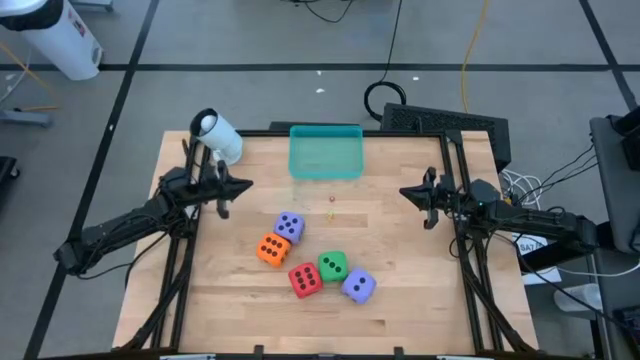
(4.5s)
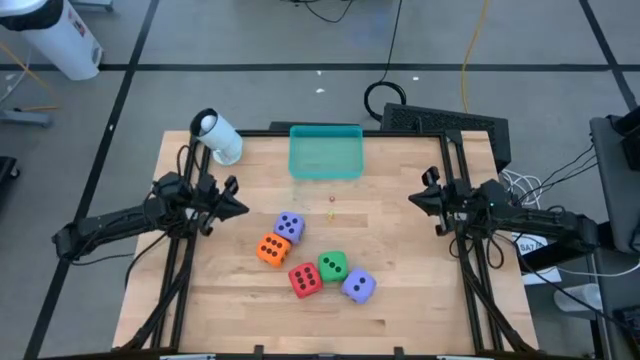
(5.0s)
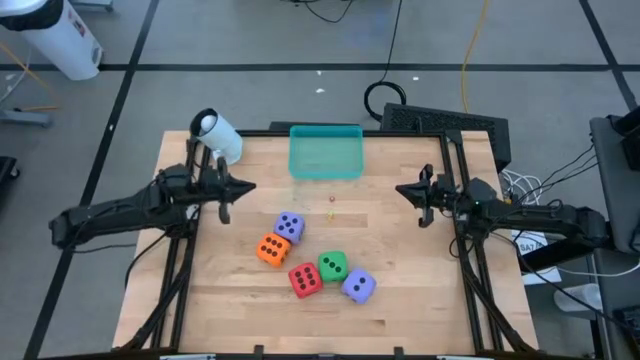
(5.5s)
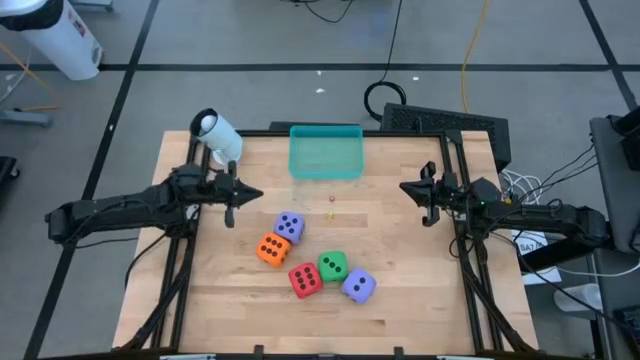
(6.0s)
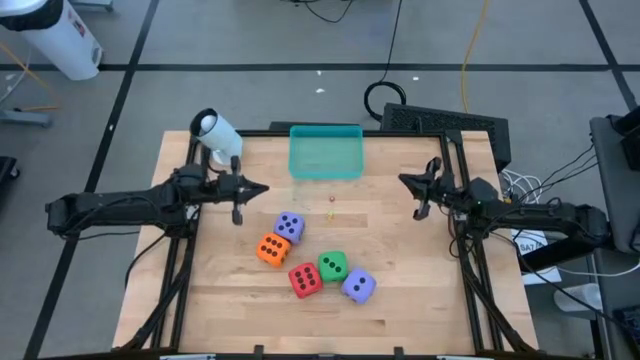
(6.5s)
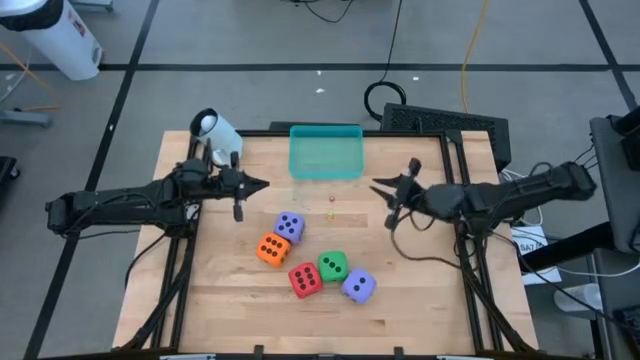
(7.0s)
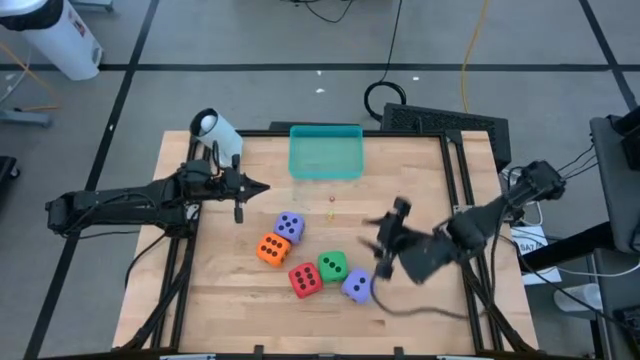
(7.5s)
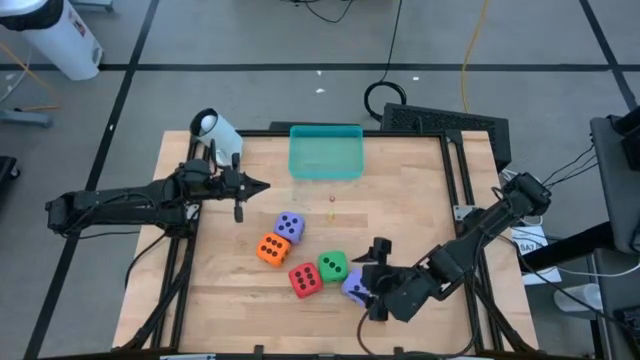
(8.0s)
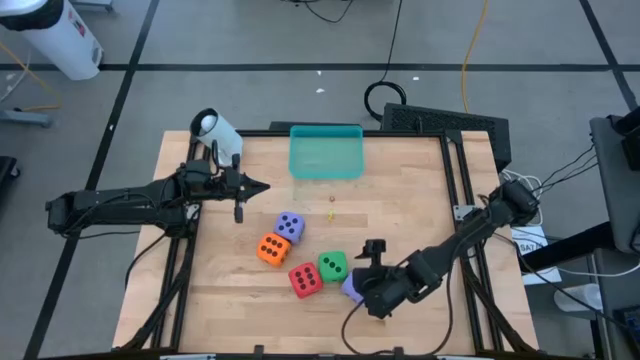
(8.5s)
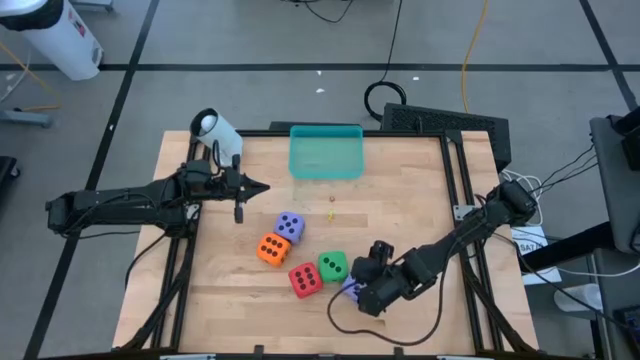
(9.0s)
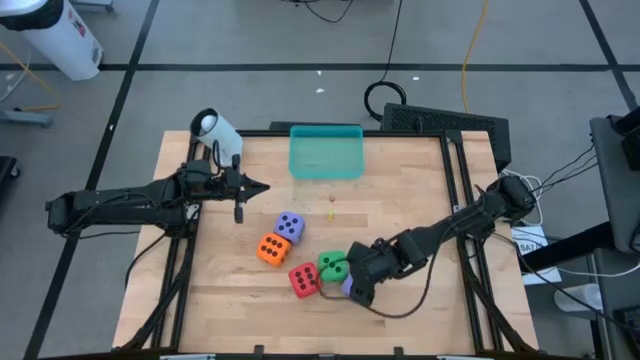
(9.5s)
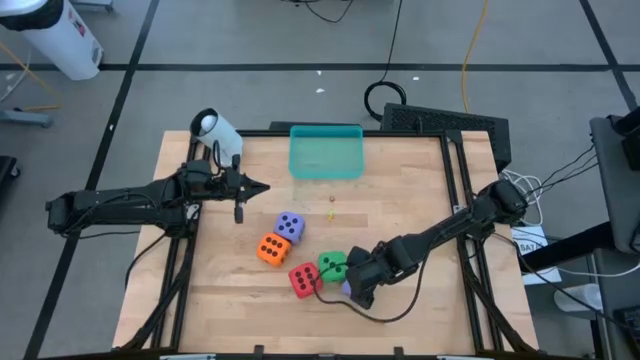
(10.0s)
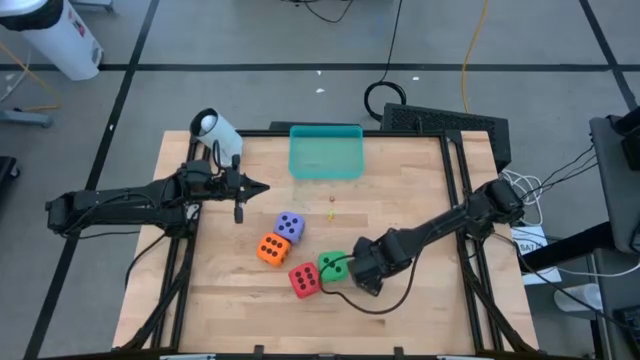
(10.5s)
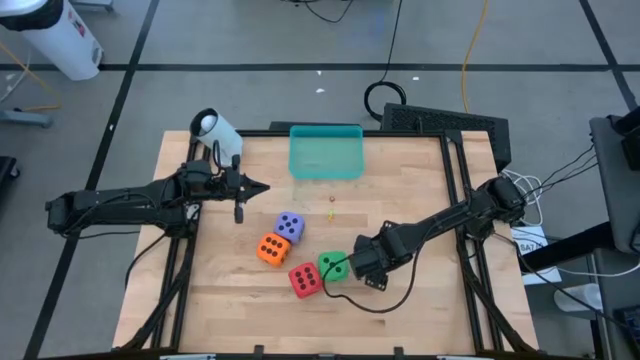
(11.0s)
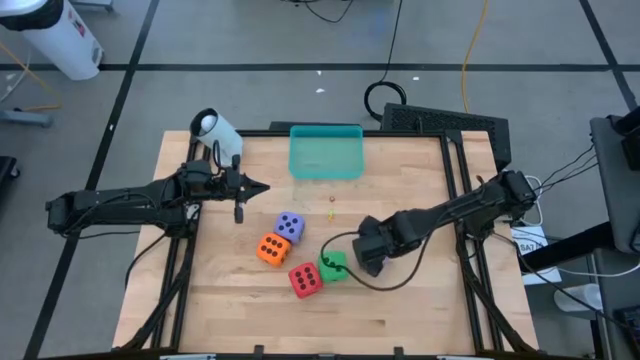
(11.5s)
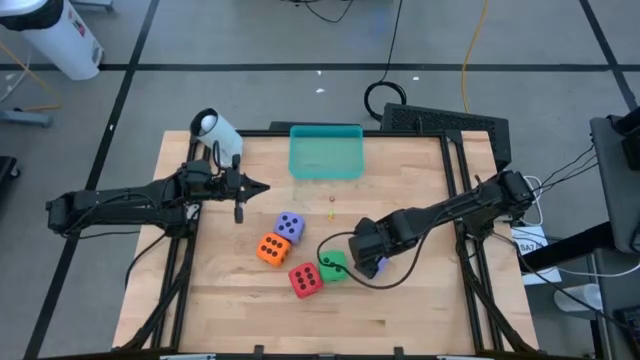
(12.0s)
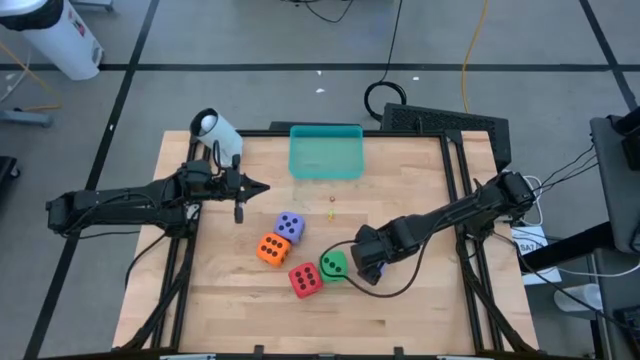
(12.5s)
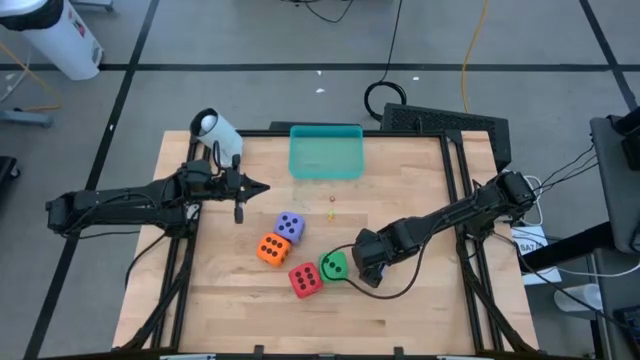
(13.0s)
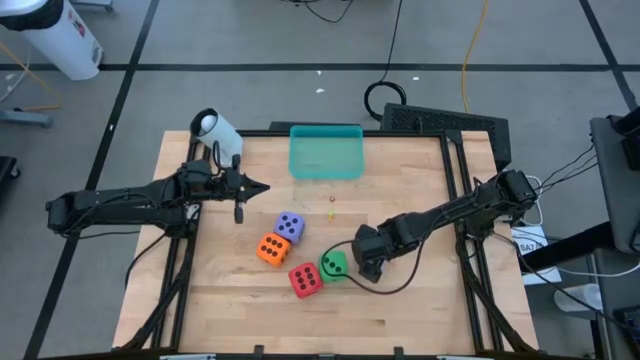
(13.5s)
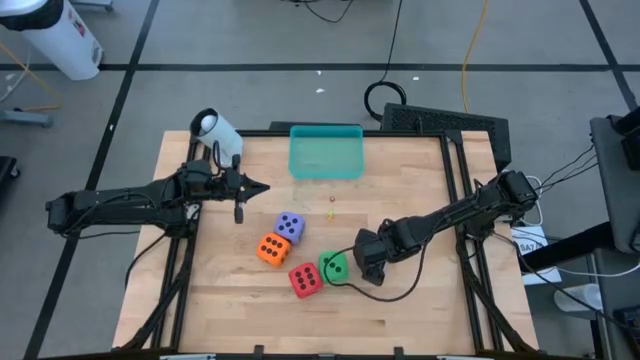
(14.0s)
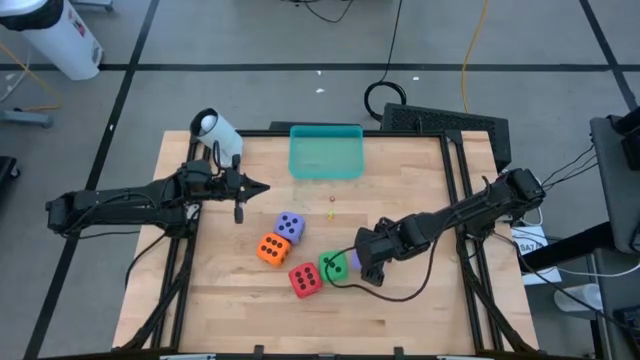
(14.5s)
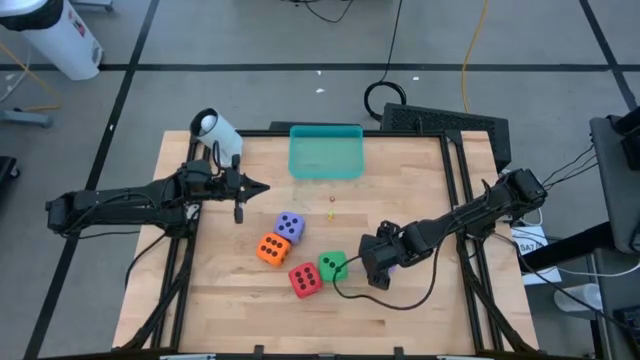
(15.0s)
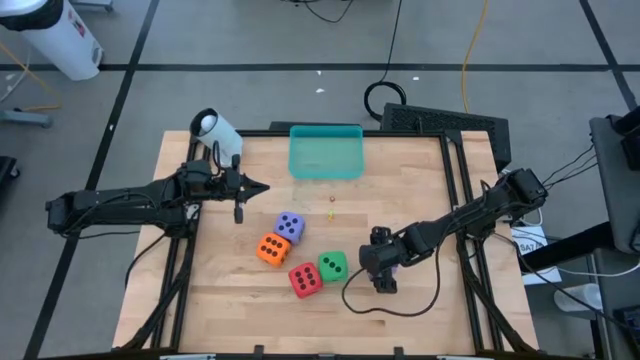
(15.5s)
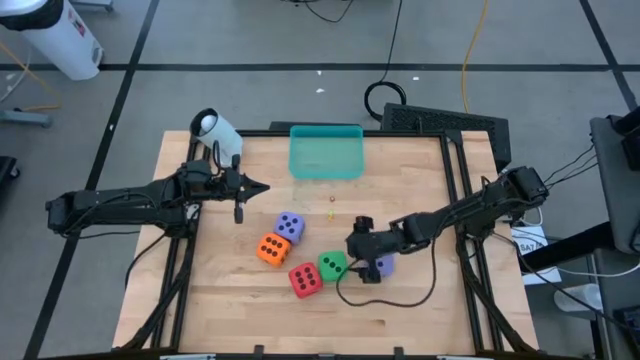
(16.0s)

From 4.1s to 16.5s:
Task: Pick & Place Dice
Put the large blue dice into the blue bin

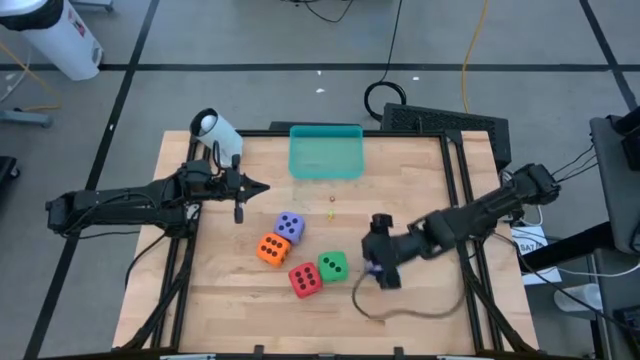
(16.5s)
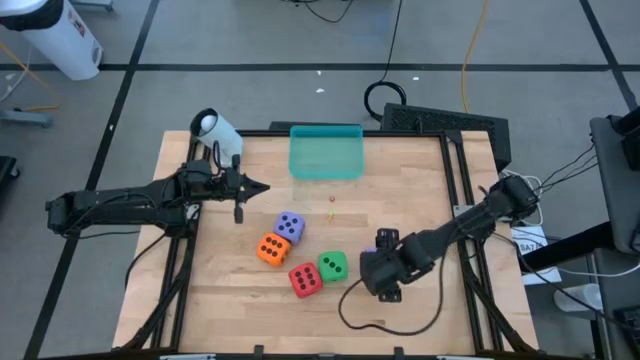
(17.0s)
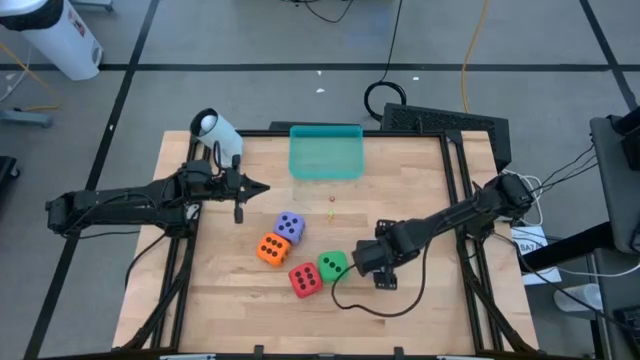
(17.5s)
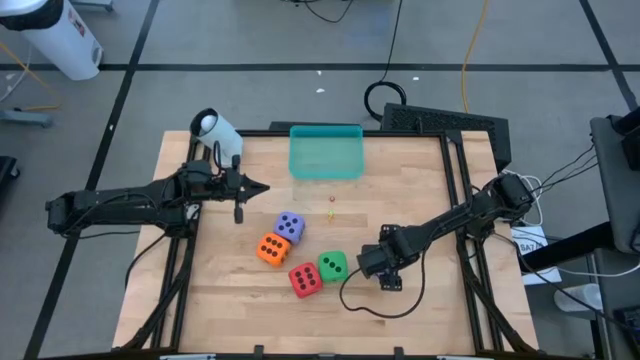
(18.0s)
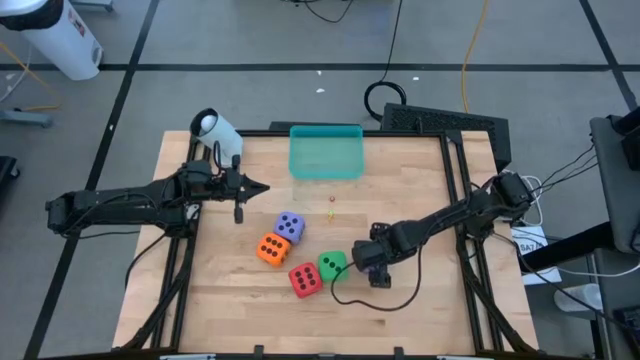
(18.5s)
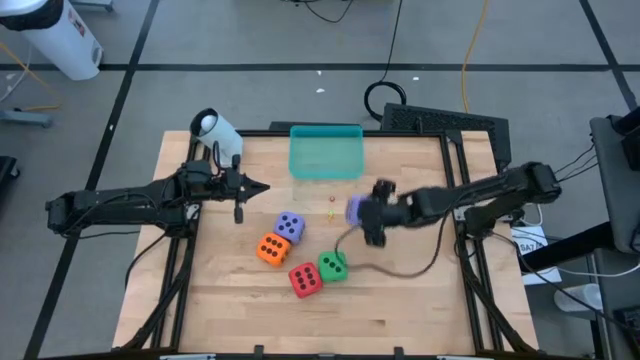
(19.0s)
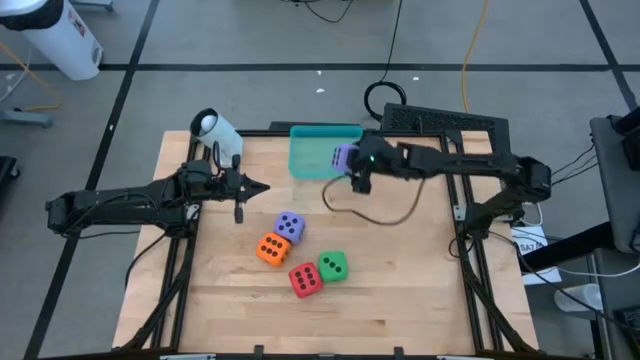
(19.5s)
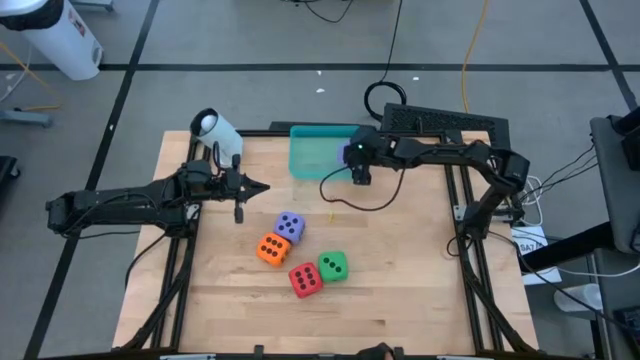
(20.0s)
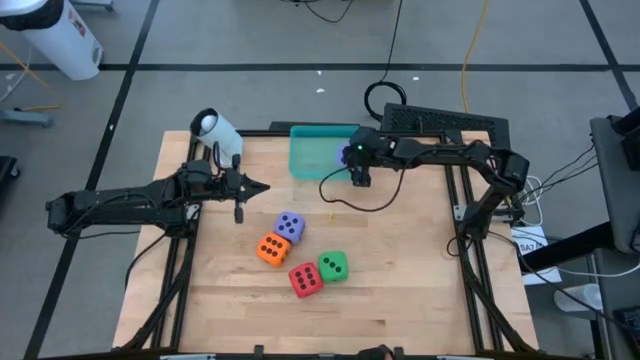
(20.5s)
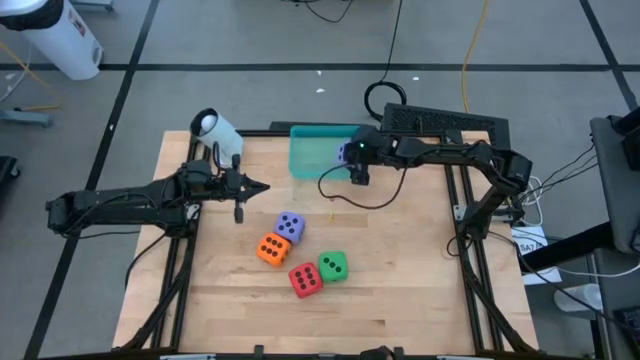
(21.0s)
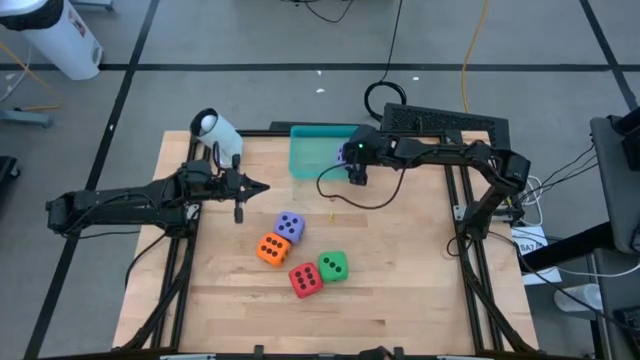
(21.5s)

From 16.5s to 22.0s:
Put the large purple dice into the blue bin

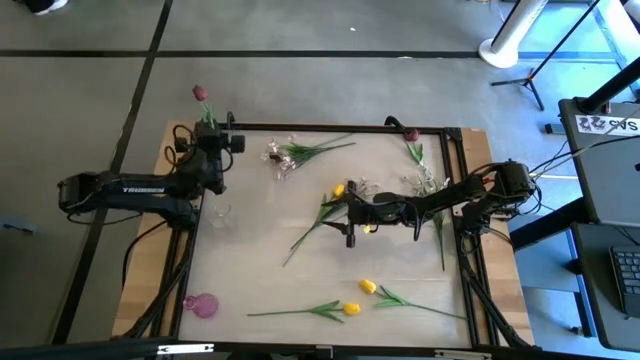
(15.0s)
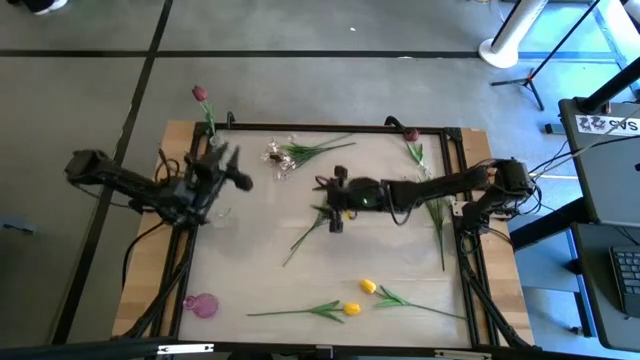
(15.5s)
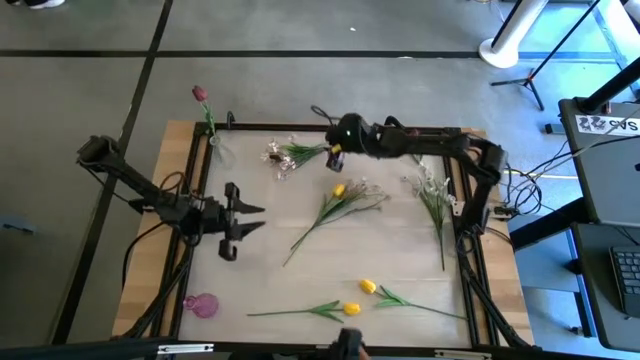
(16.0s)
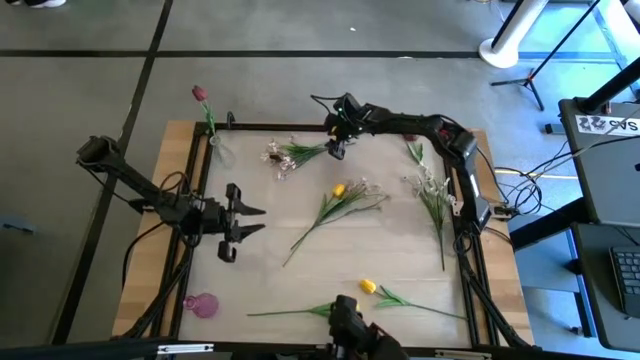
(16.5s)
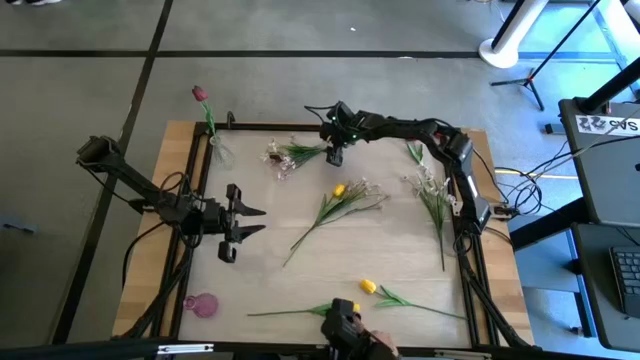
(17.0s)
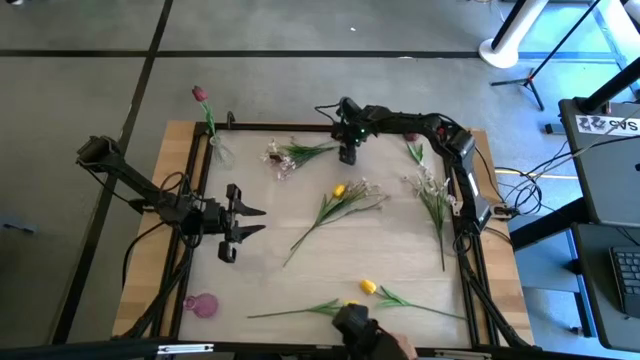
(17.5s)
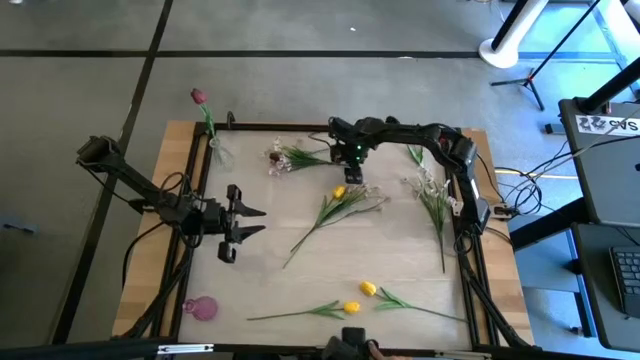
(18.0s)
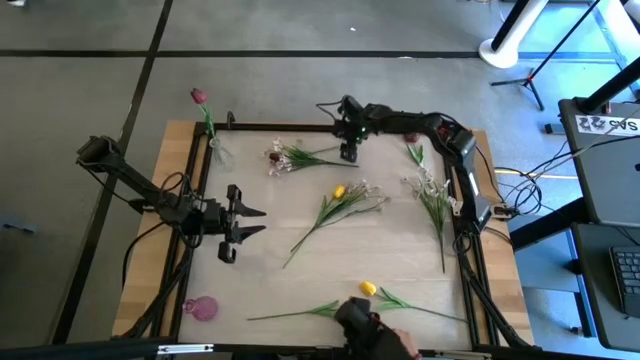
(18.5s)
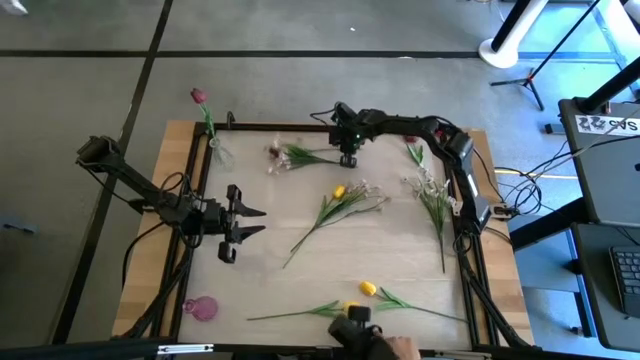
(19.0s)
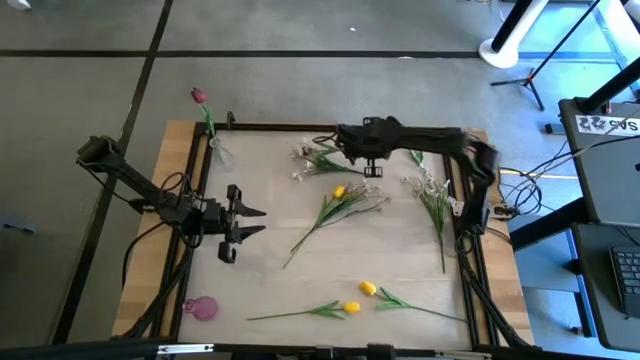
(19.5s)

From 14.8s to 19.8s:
Task: Sort flowers into vase by color
Put the left red flower into the top transparent vase
